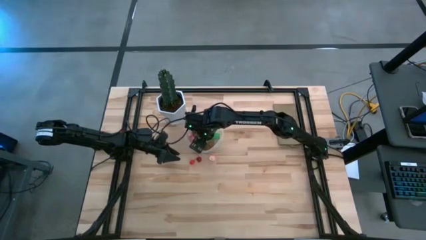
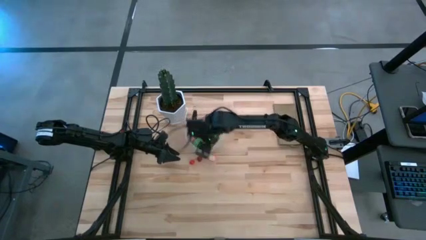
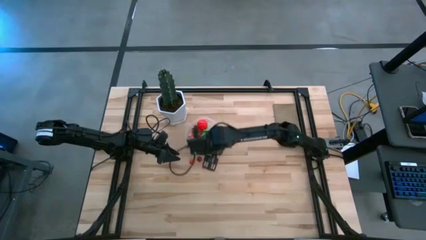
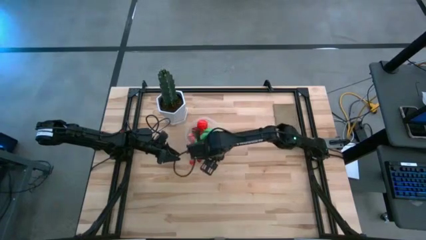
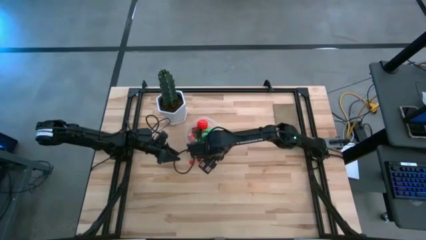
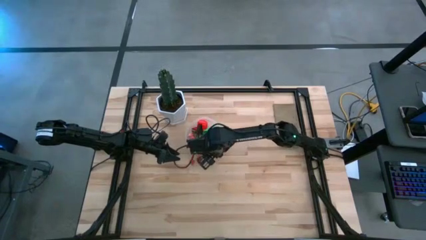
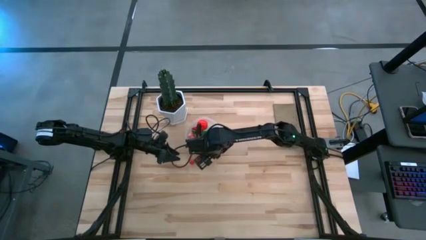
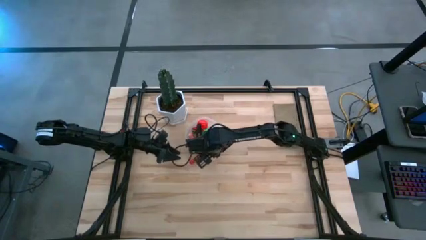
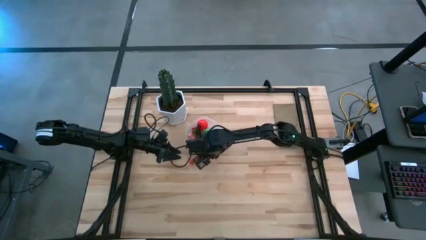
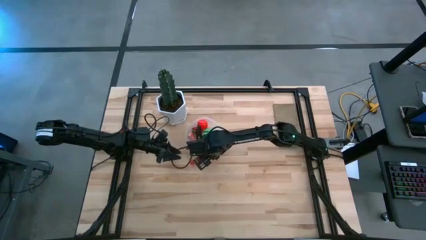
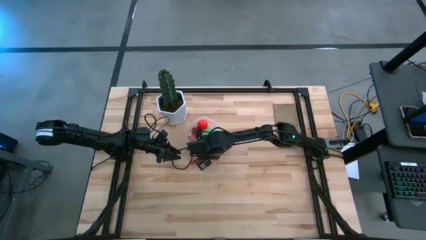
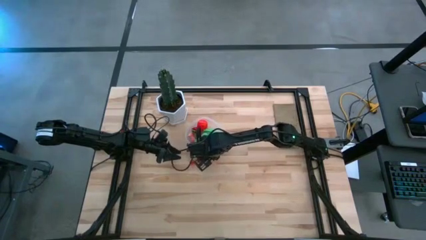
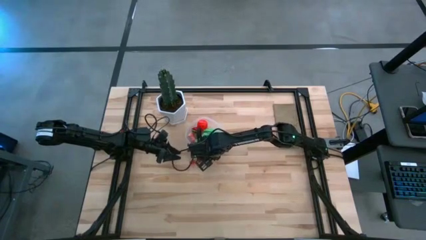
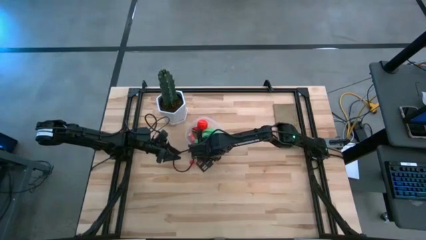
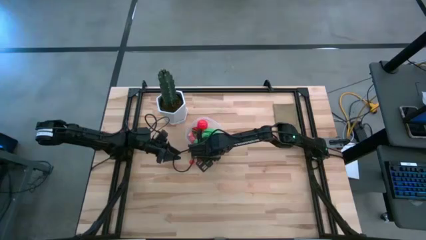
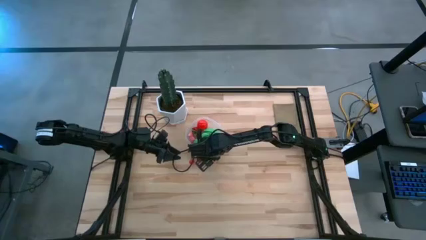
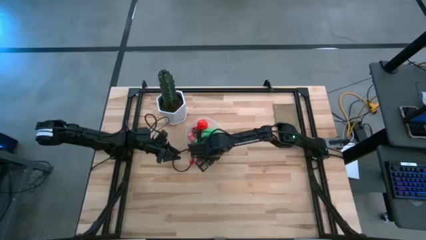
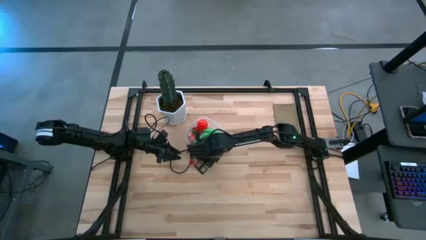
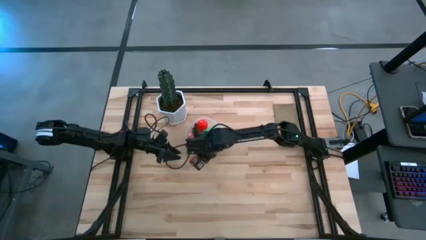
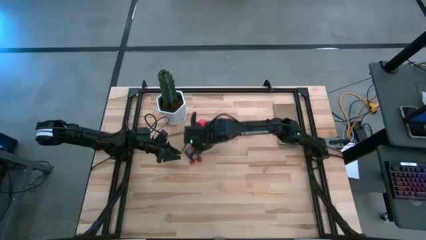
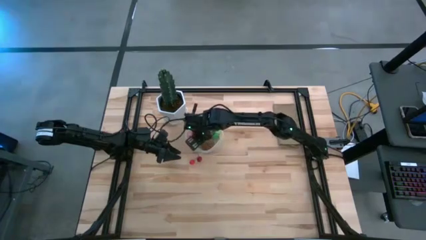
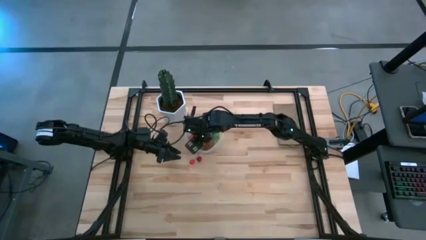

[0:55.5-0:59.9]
Task: Pick and placing Produce into tupperware
Put the peach into the transparent bin

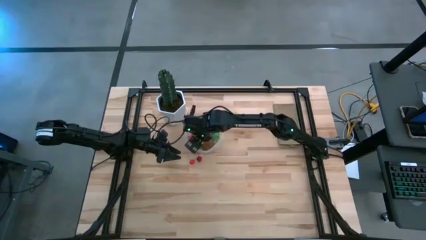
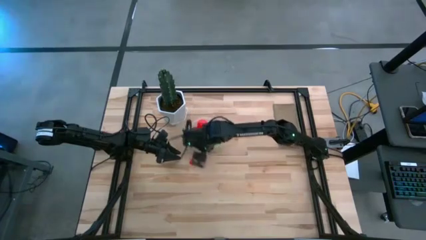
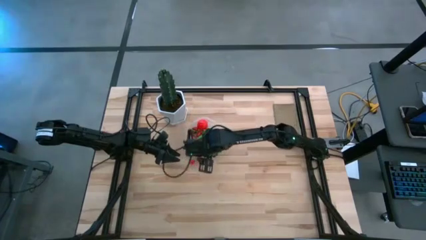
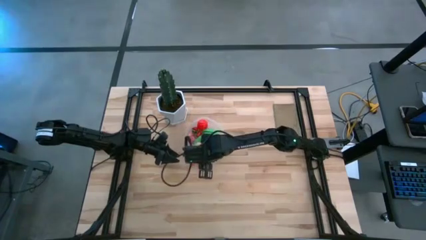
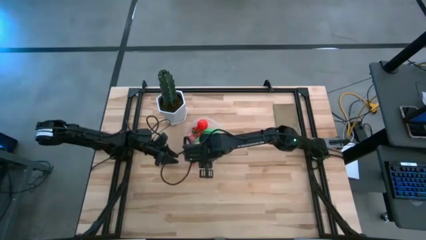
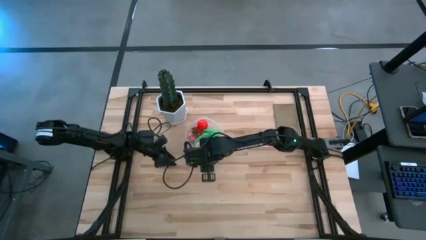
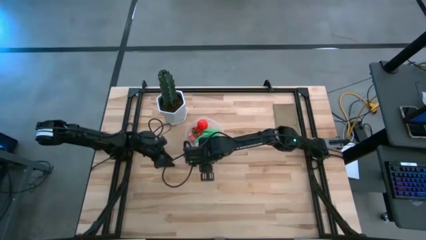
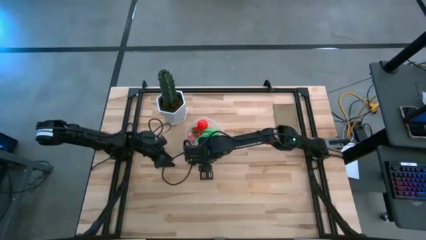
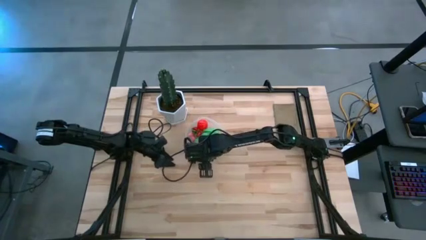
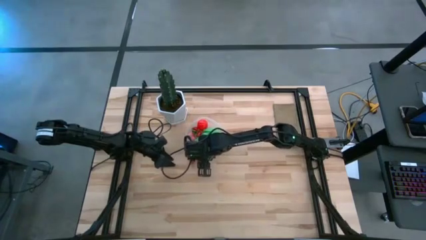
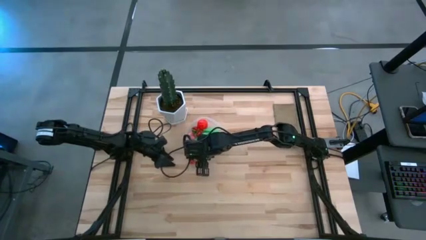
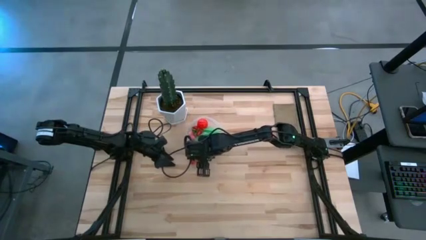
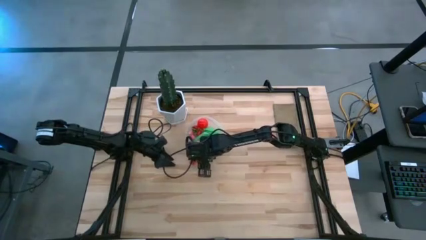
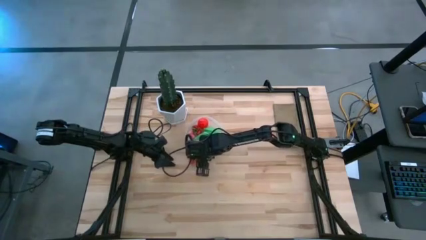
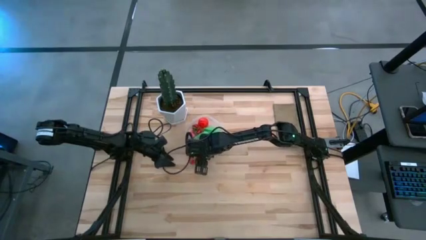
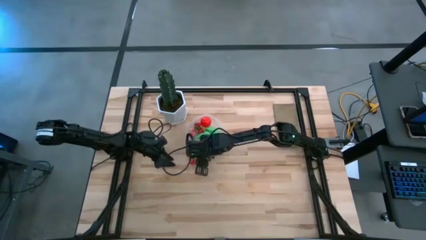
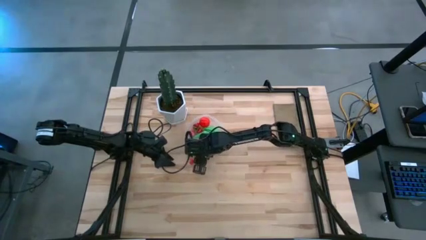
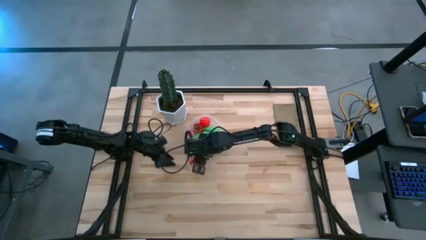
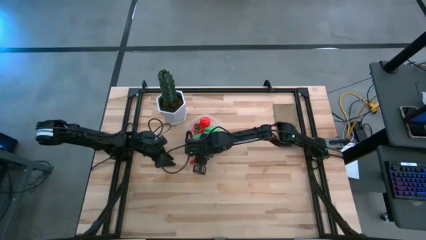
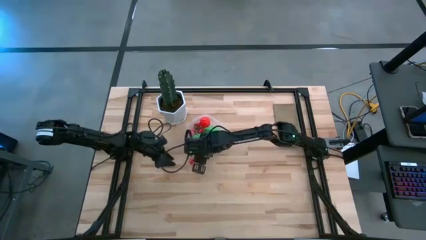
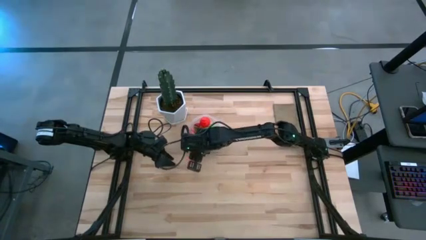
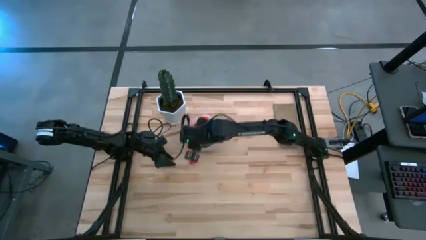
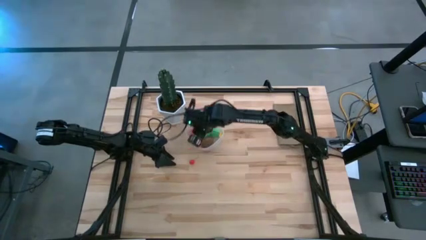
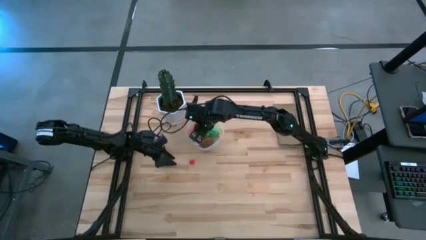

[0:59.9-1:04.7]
Put the red cherry into the transparent bin

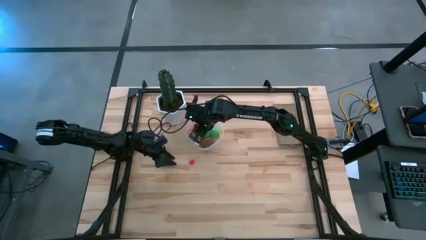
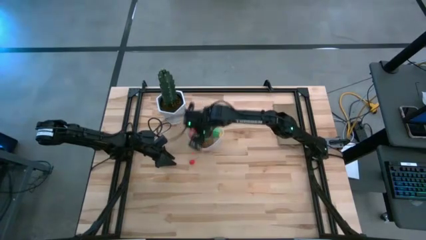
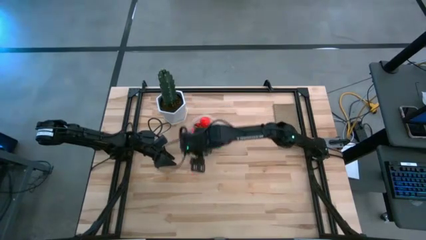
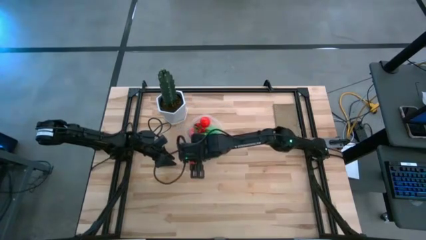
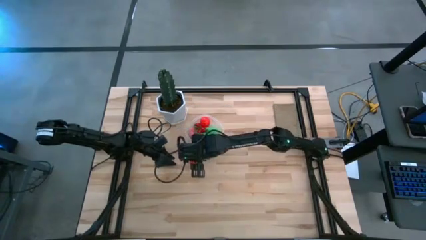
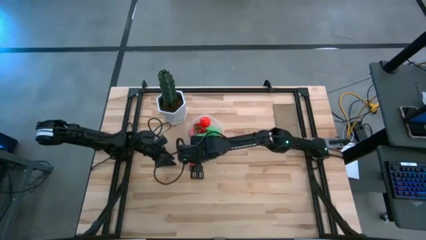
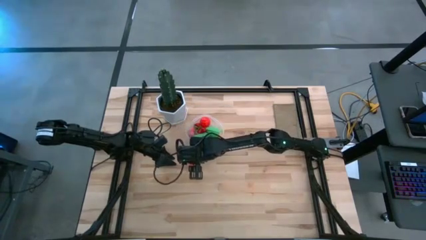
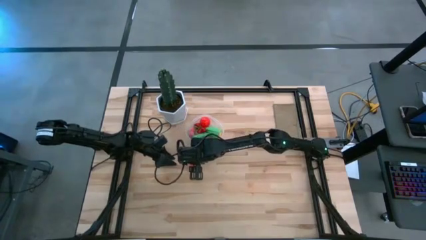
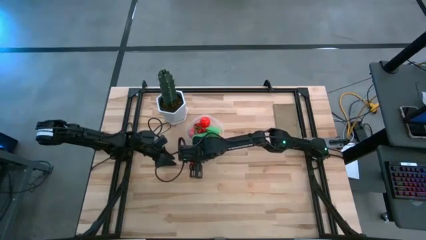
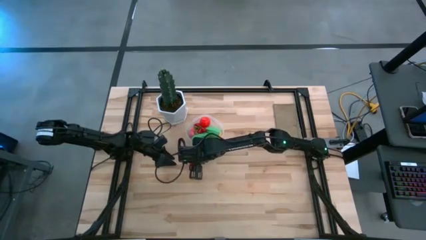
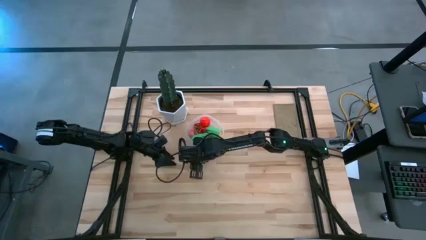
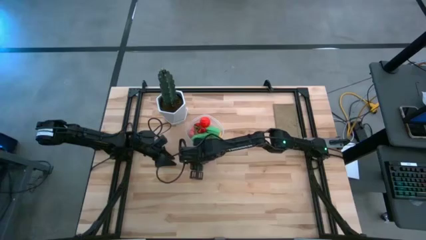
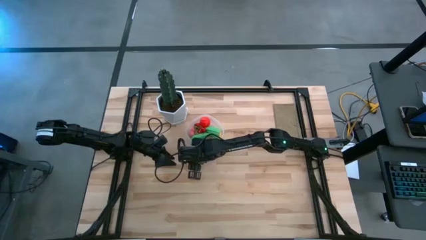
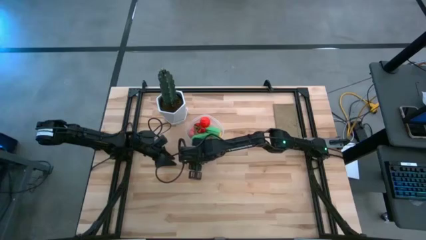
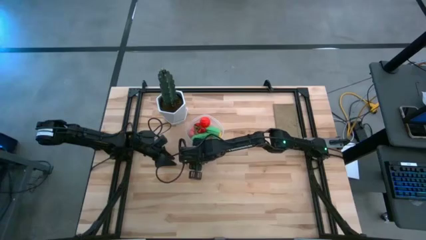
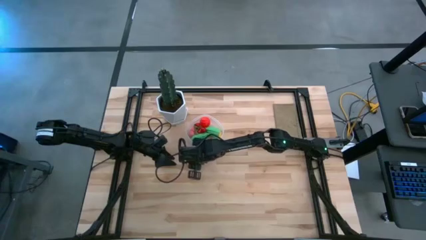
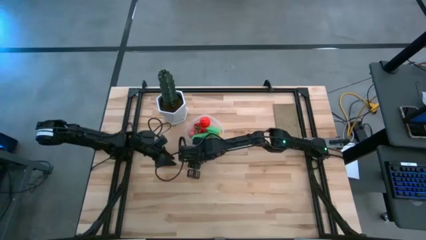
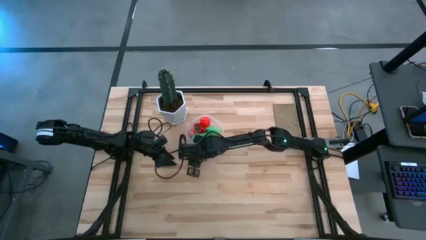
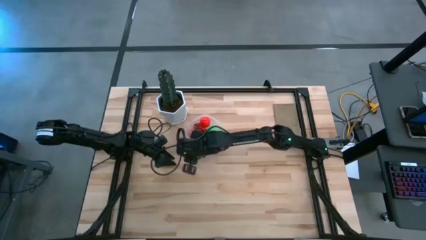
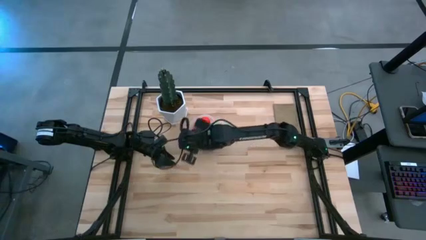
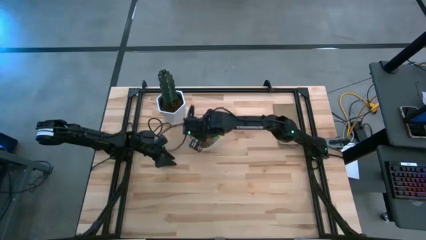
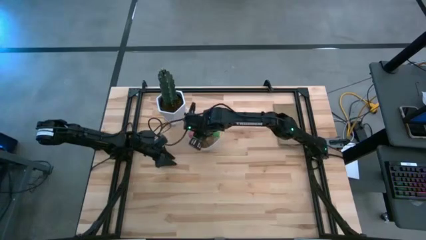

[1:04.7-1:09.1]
Put the orange cherry into the transparent bin

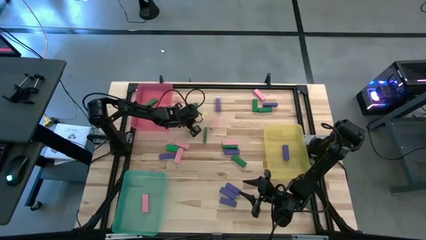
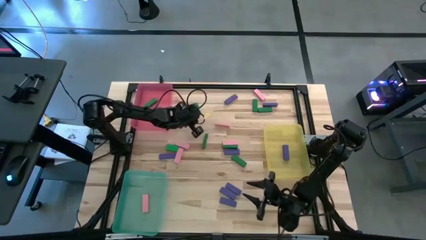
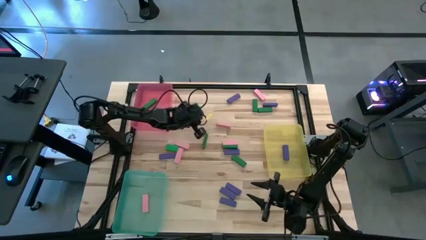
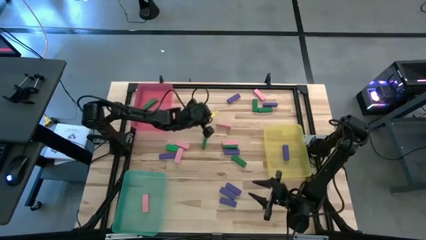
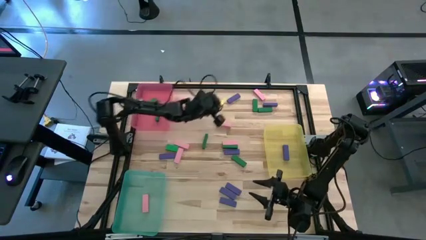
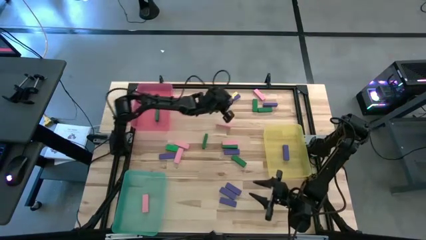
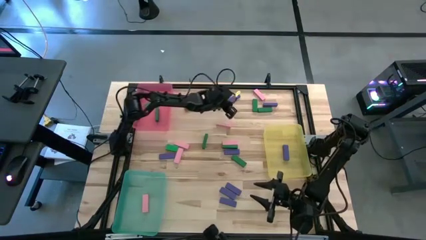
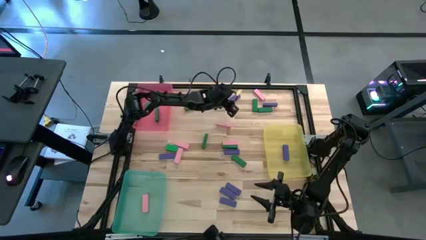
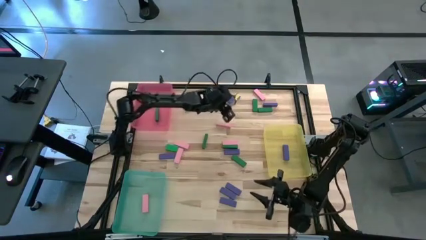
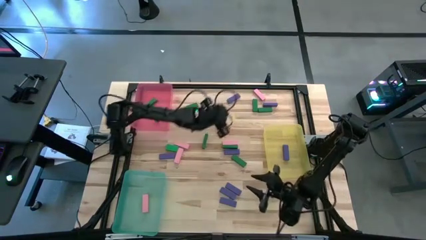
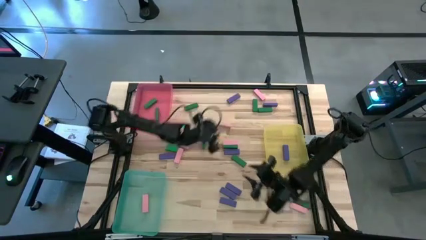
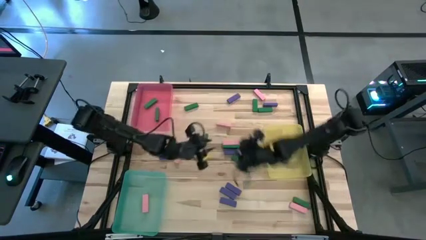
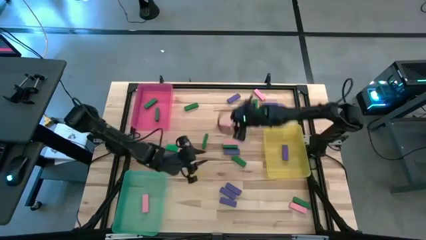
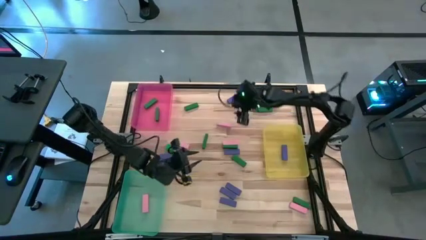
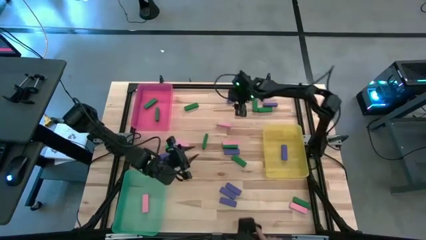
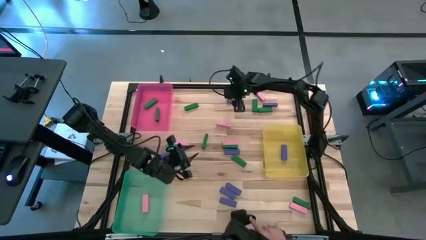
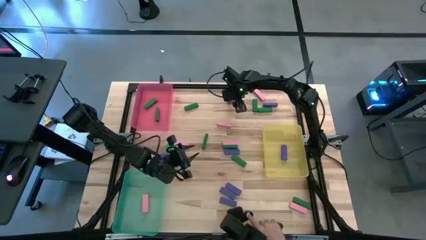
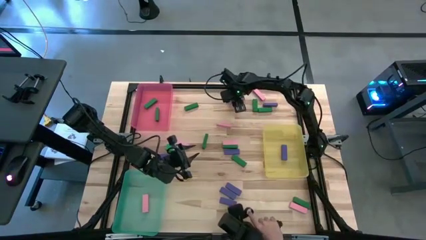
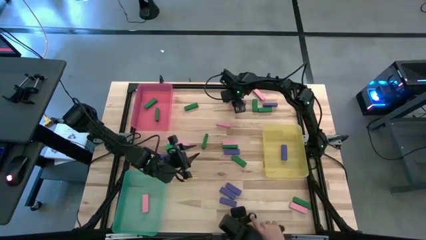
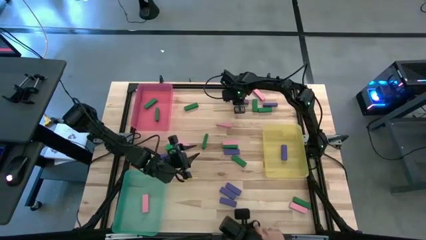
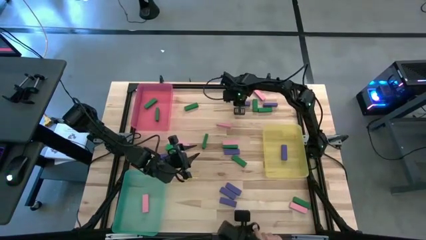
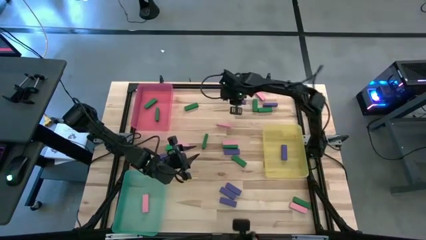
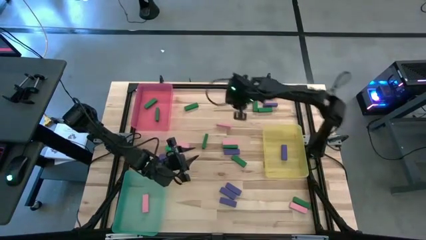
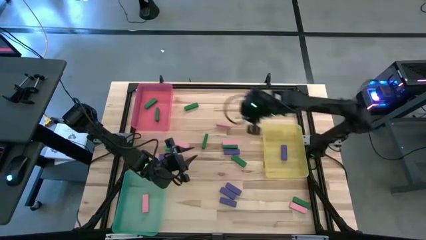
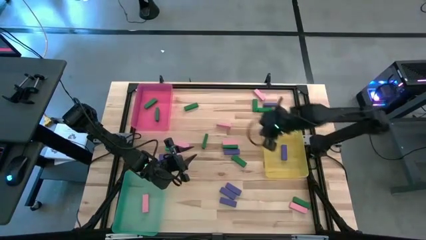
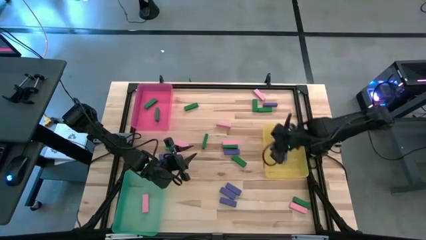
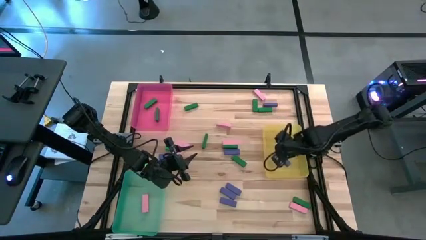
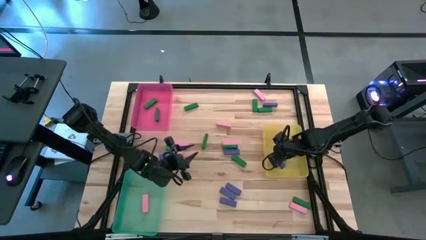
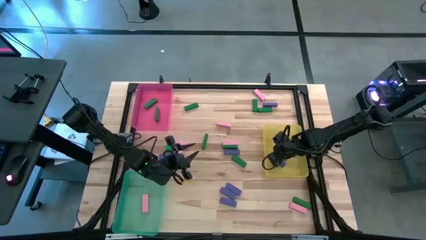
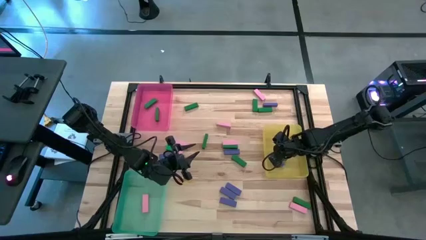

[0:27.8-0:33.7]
Task: Sort blocks
Put the blue block into the yellow bin
